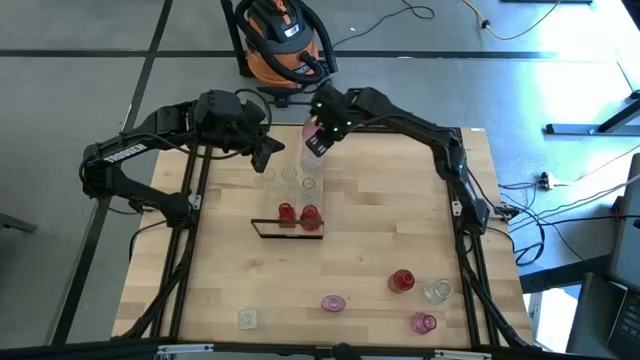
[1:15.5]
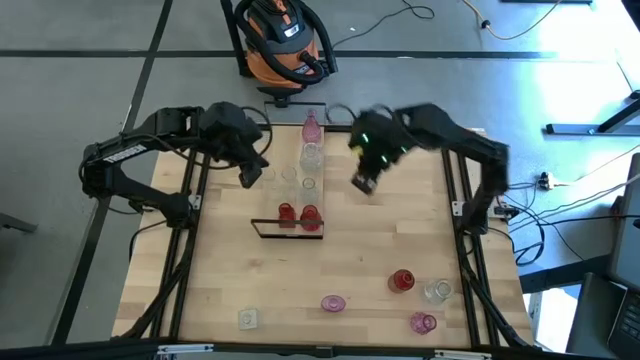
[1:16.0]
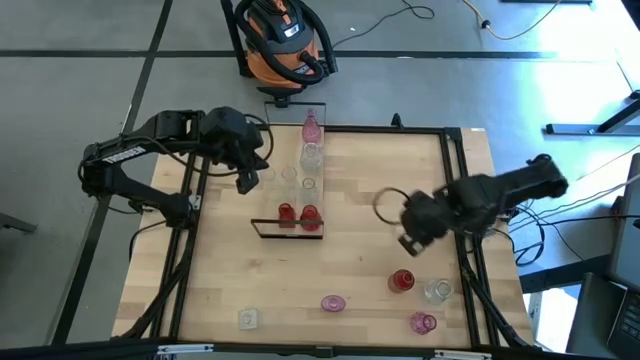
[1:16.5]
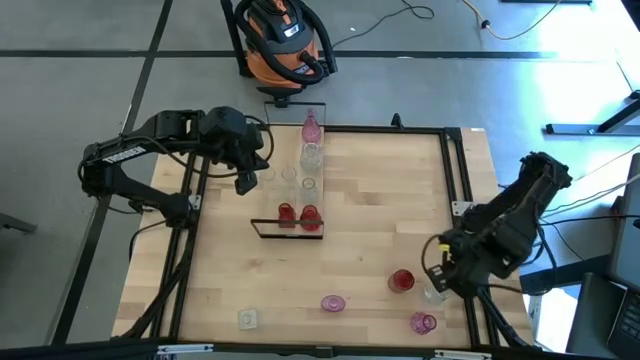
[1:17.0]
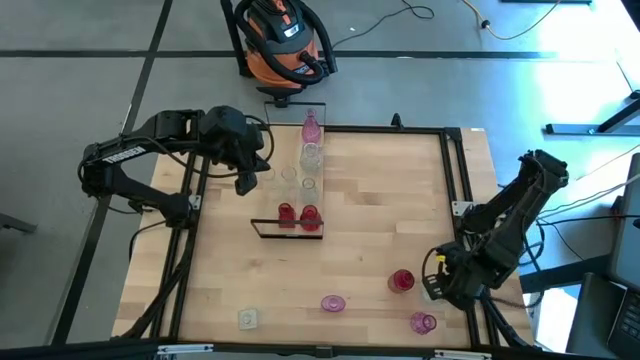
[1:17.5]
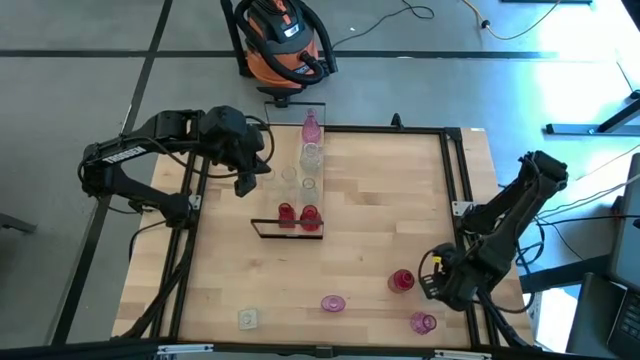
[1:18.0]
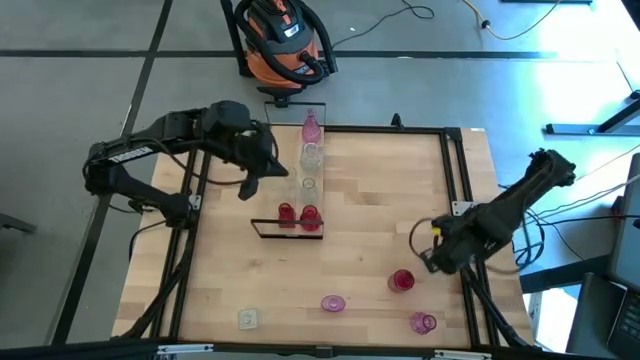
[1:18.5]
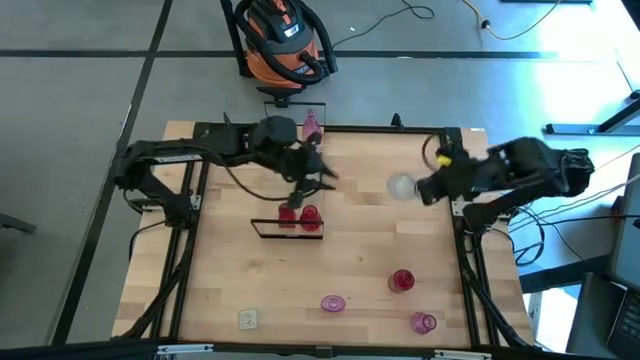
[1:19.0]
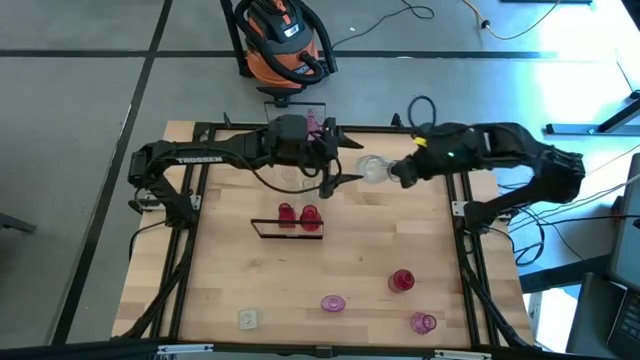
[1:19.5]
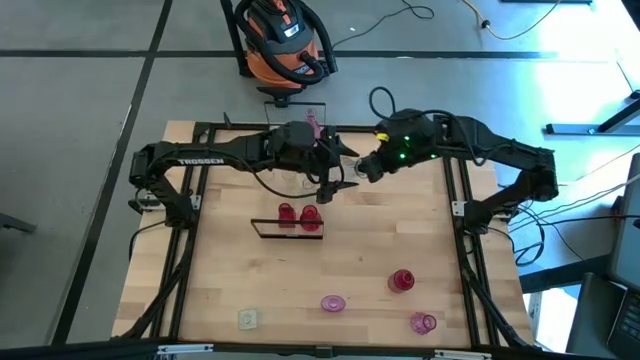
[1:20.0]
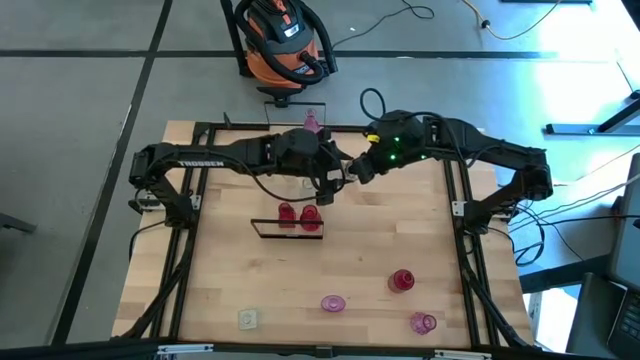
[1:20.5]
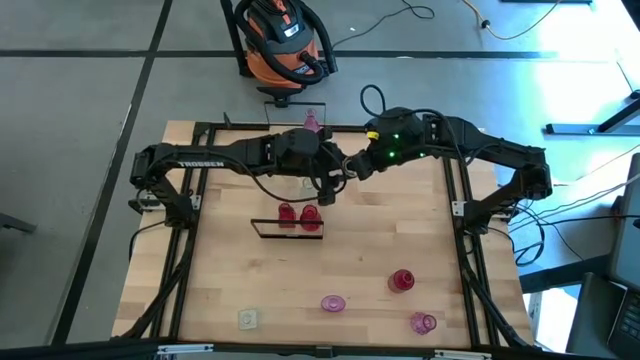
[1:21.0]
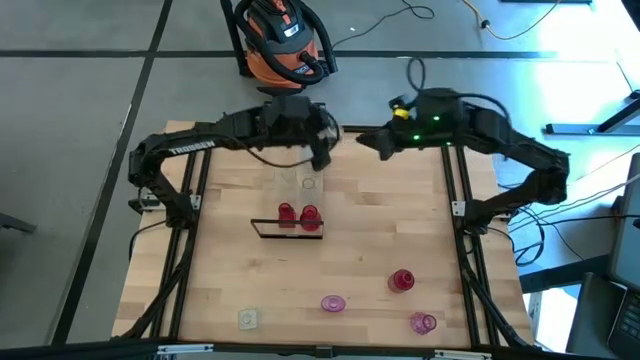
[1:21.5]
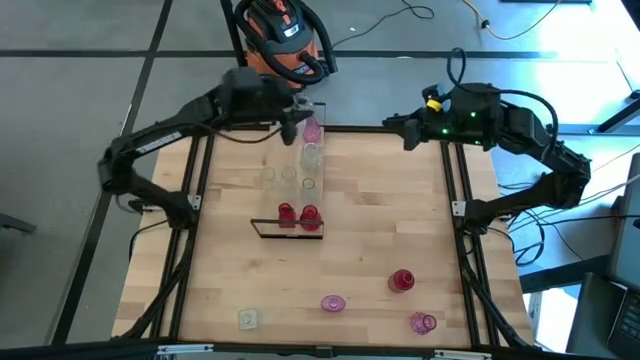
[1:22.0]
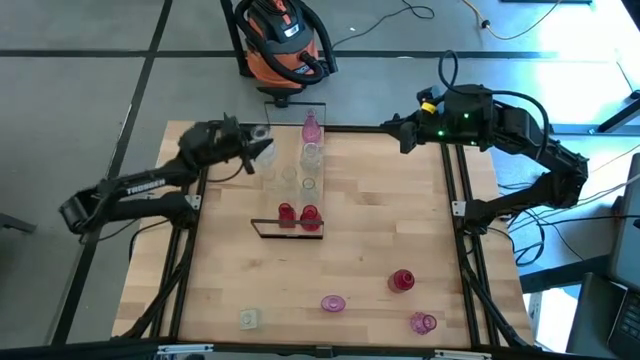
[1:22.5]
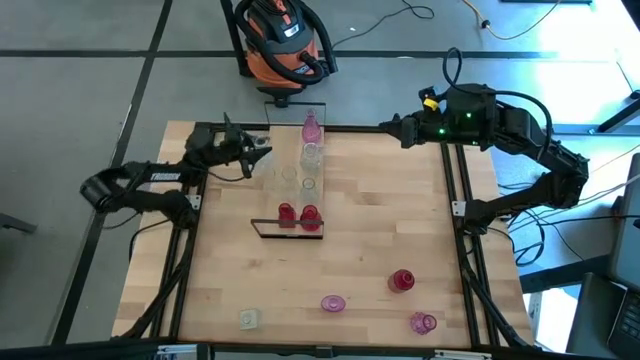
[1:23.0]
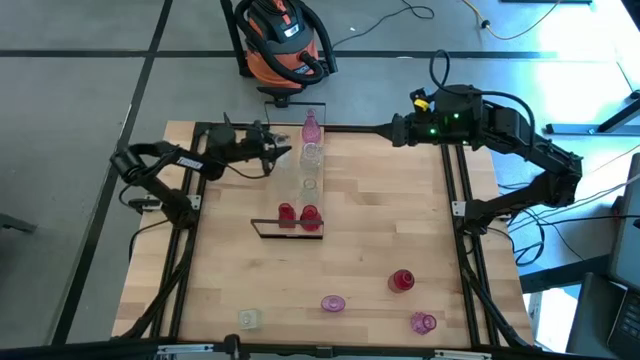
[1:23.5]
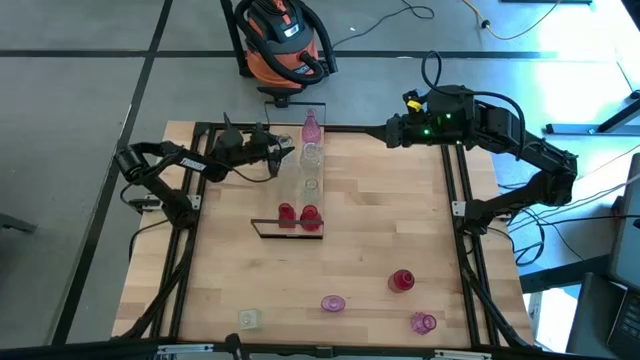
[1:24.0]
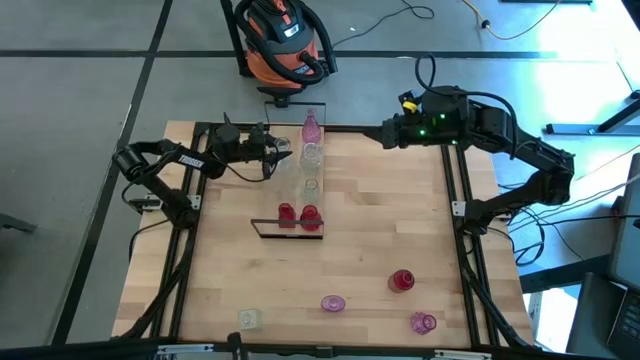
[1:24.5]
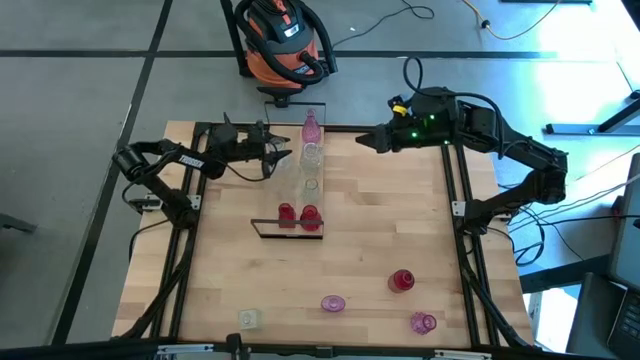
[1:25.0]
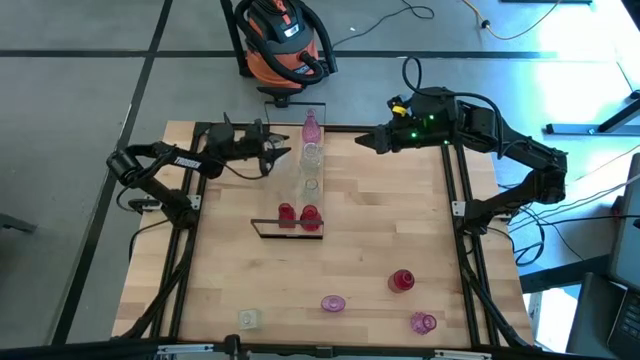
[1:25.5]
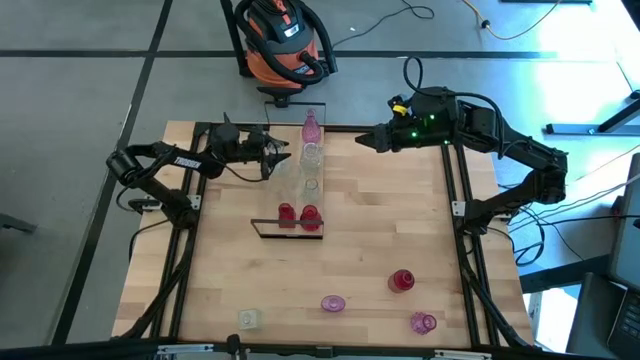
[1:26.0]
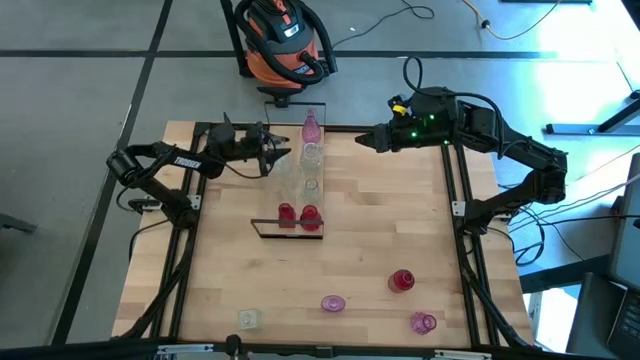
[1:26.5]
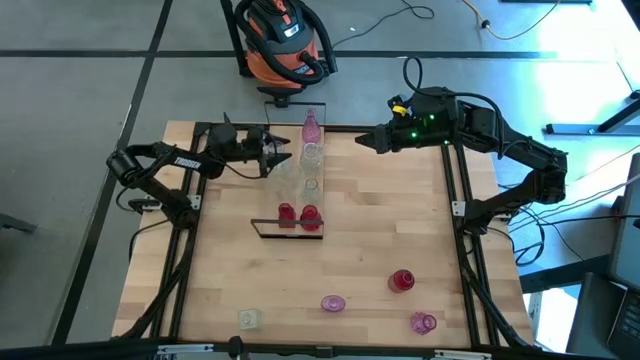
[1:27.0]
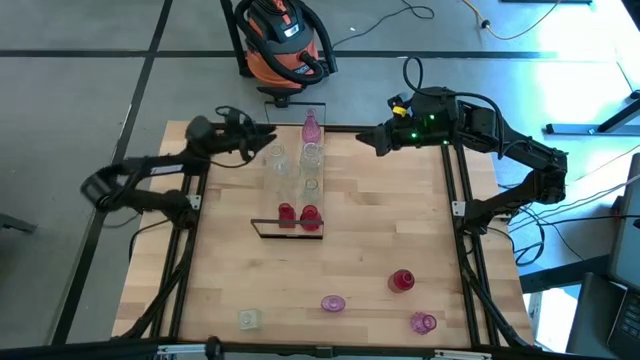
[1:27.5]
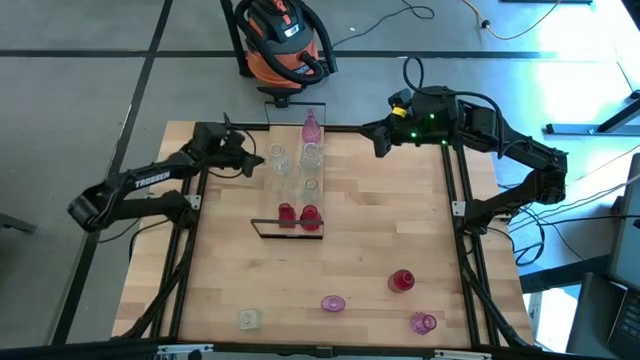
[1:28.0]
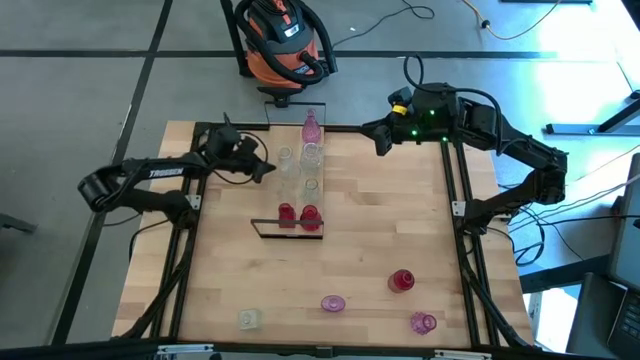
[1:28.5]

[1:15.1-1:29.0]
Task: sort vases onto shelf
Put the transparent vase on the shelf

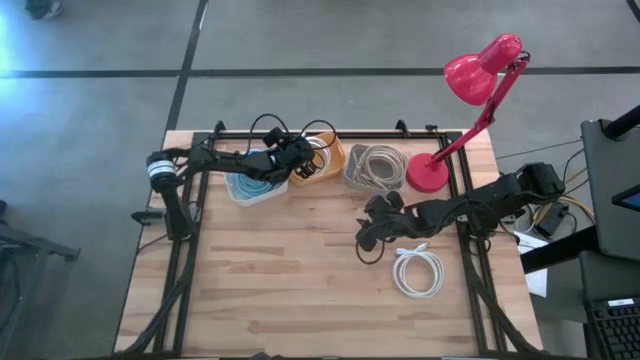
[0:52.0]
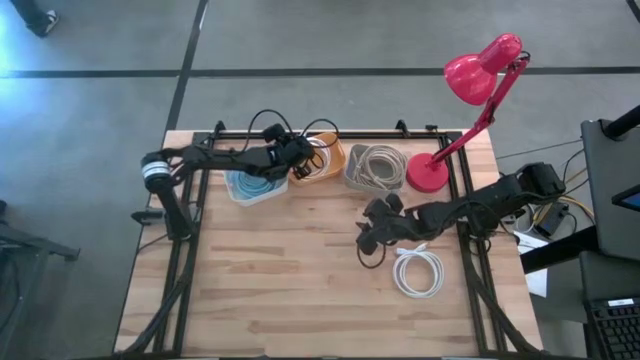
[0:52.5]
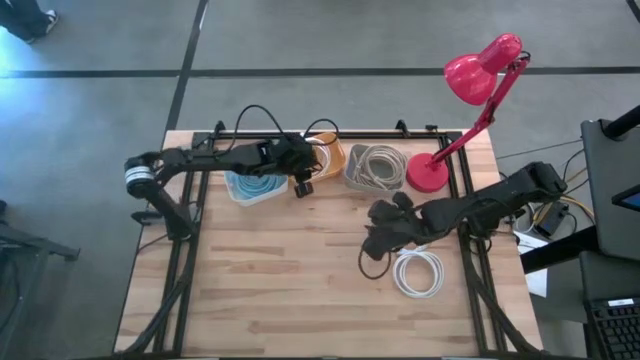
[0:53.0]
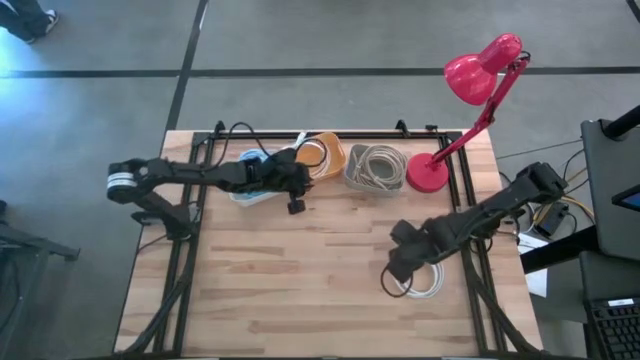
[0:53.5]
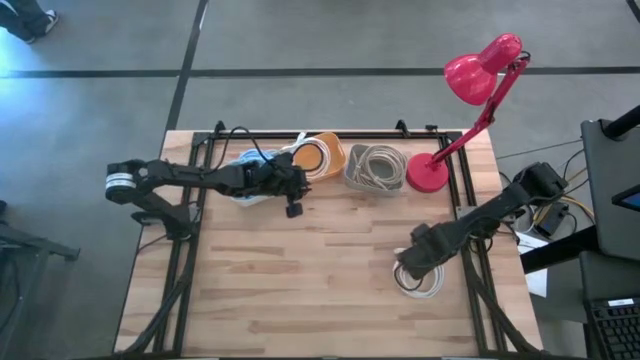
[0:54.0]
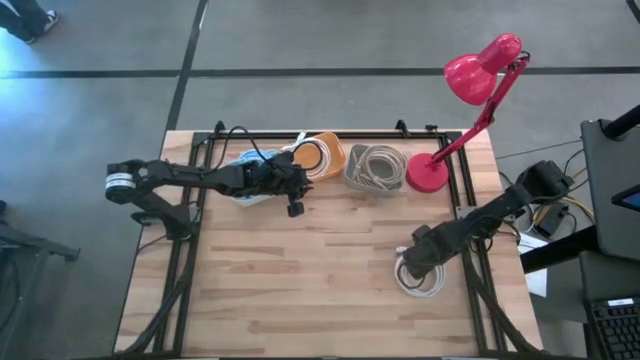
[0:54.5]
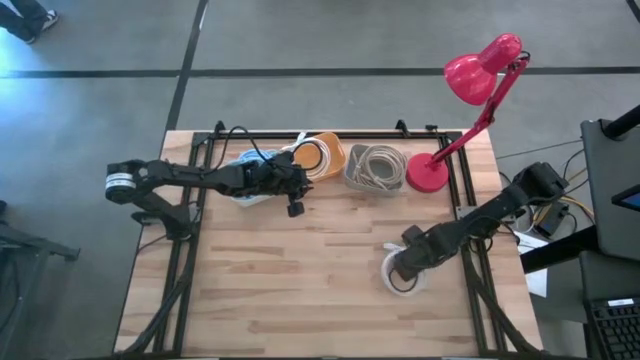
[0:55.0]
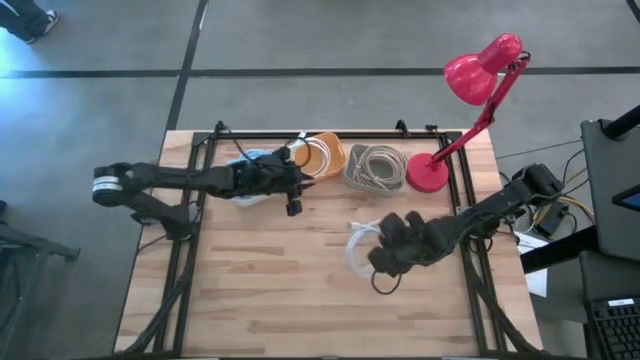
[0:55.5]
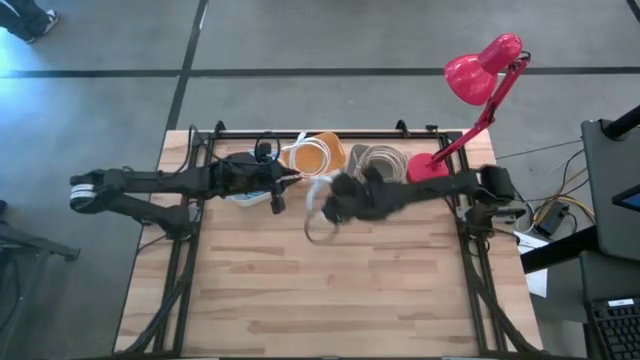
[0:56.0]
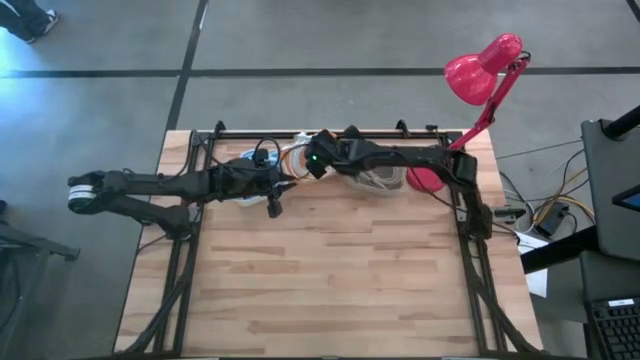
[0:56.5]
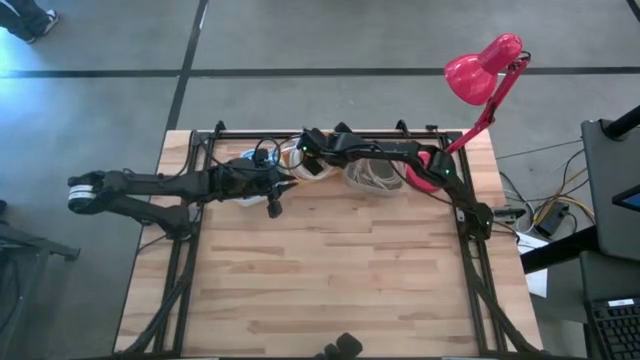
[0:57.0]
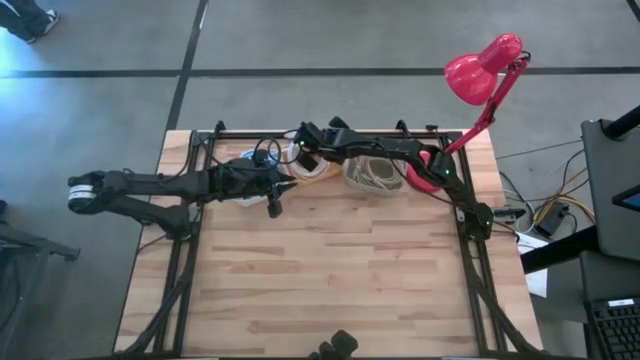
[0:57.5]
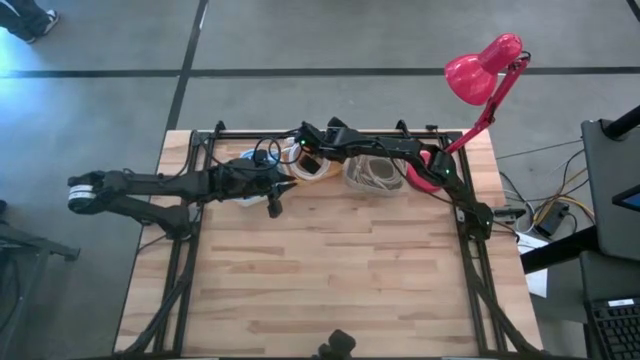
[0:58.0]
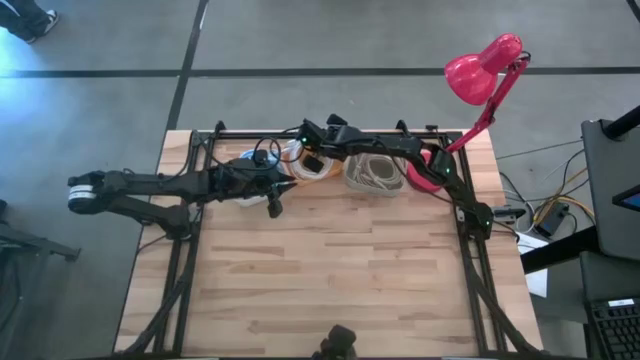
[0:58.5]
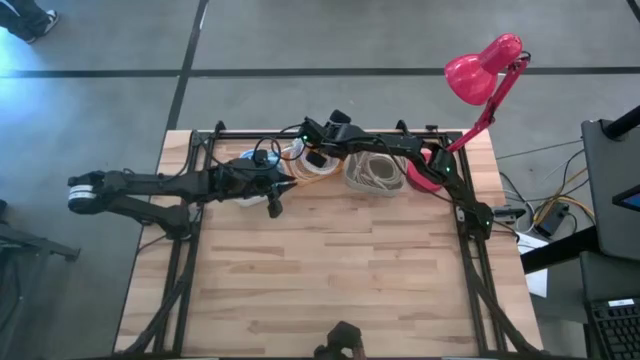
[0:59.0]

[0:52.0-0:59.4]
Task: Pick & Place USB Port
Put the white charger cable into the yellow bin
